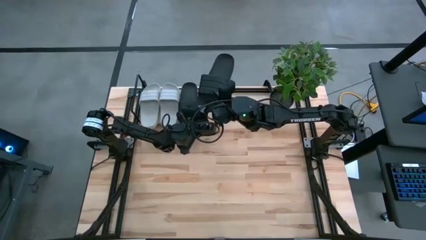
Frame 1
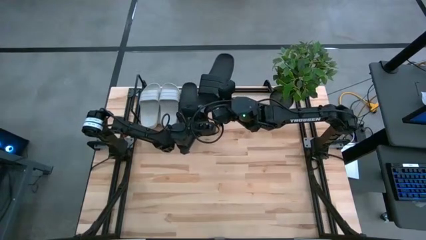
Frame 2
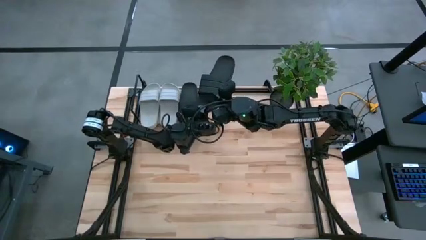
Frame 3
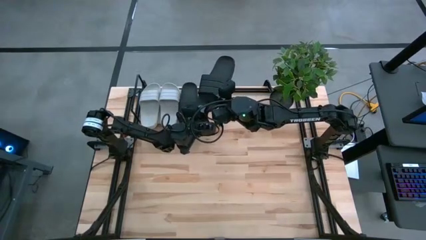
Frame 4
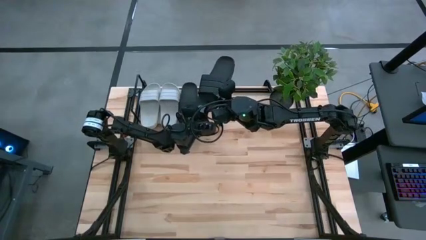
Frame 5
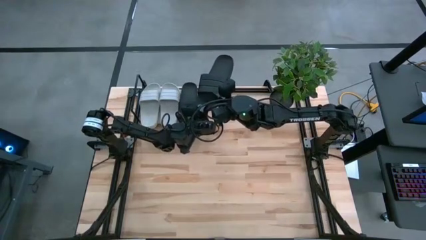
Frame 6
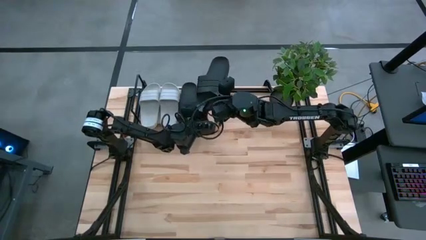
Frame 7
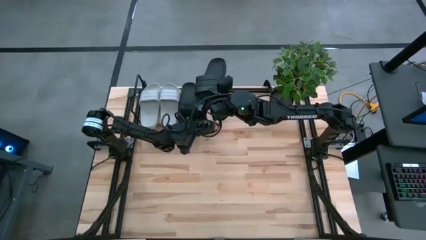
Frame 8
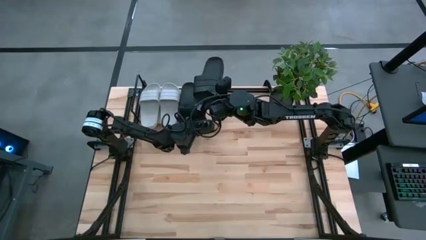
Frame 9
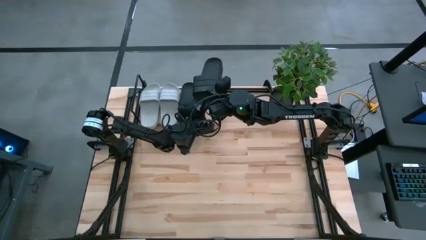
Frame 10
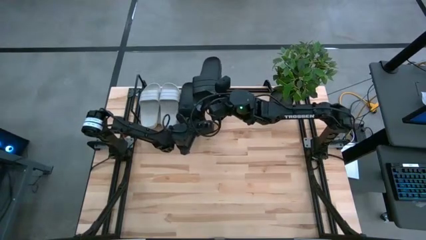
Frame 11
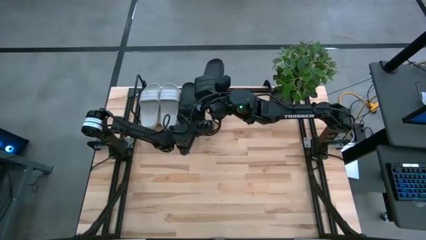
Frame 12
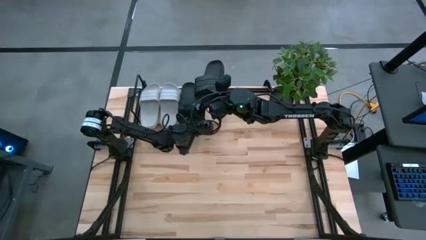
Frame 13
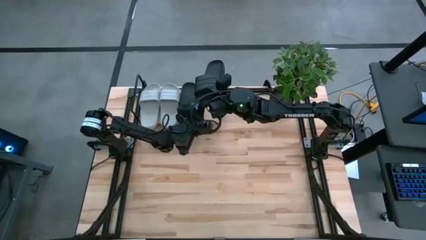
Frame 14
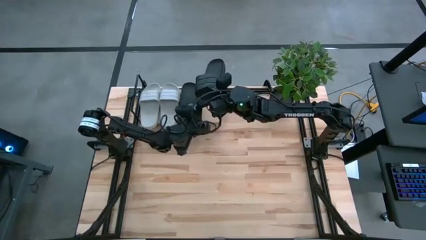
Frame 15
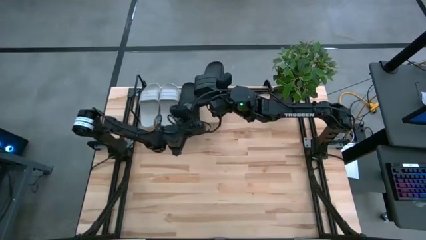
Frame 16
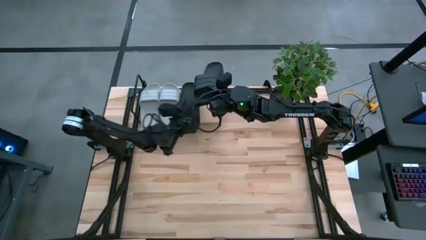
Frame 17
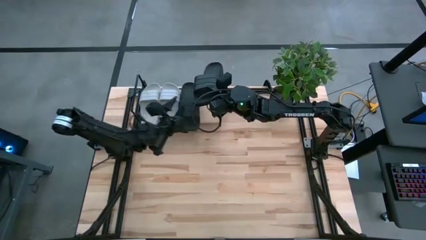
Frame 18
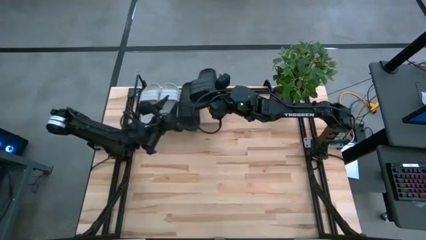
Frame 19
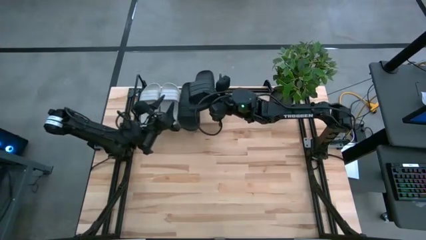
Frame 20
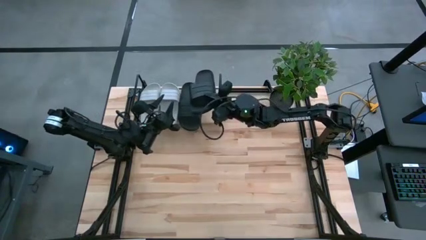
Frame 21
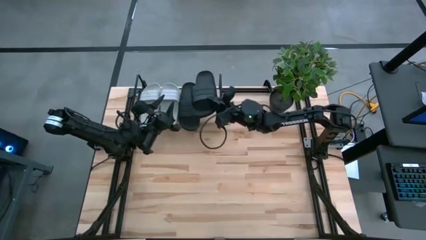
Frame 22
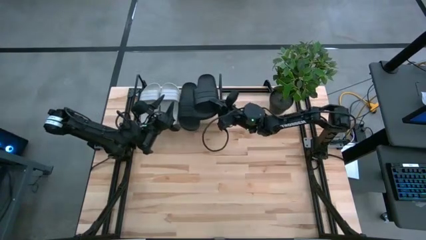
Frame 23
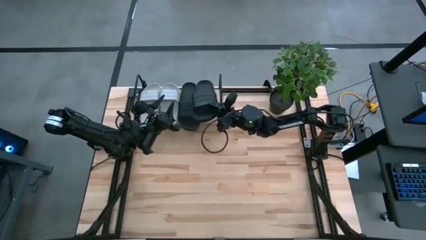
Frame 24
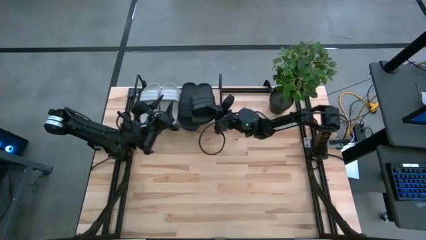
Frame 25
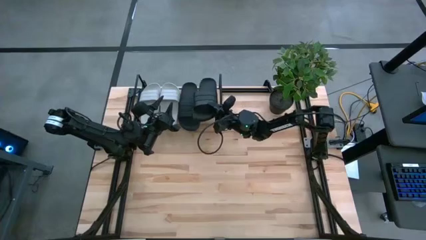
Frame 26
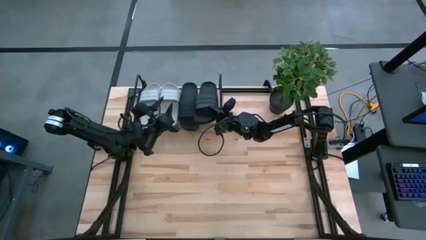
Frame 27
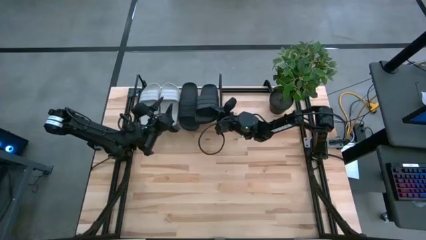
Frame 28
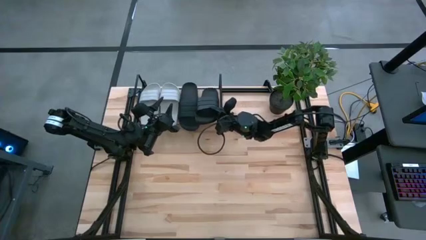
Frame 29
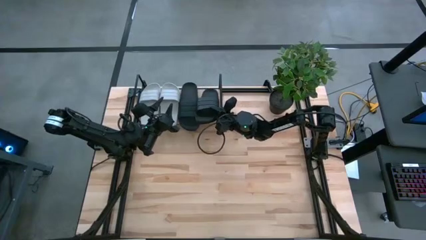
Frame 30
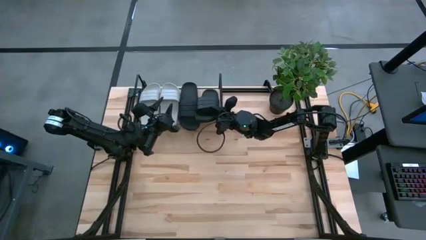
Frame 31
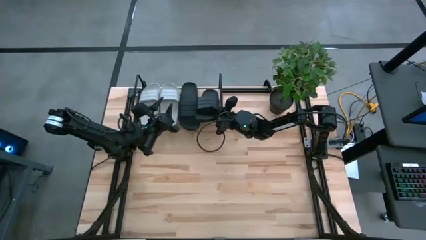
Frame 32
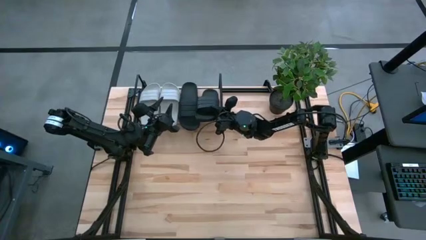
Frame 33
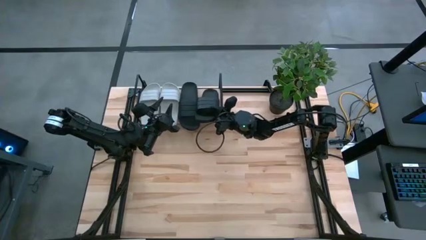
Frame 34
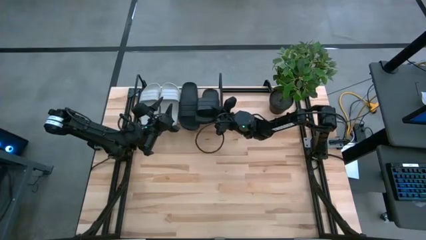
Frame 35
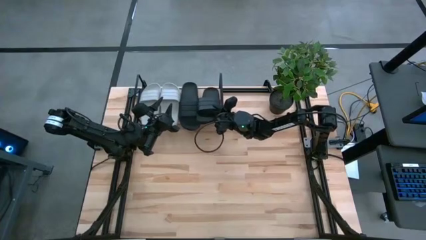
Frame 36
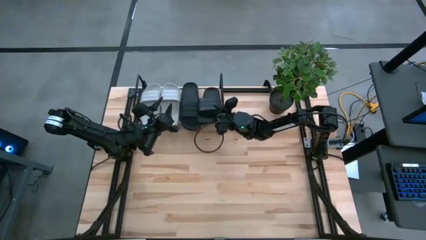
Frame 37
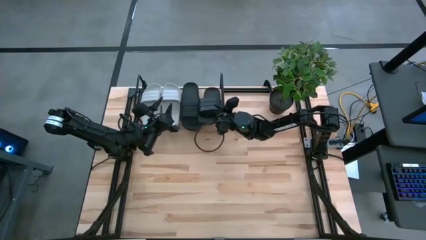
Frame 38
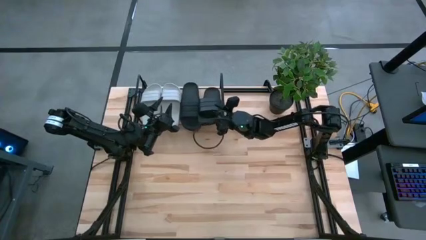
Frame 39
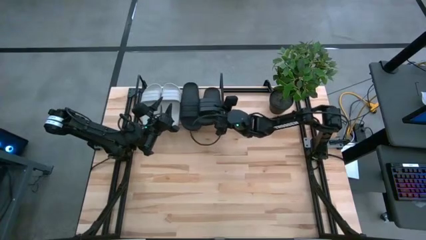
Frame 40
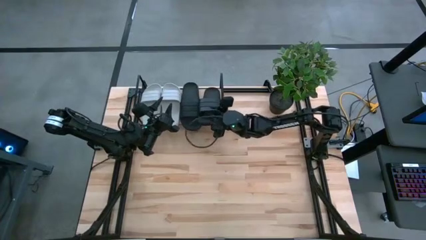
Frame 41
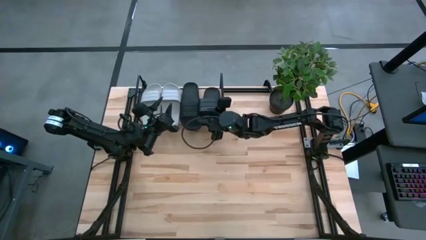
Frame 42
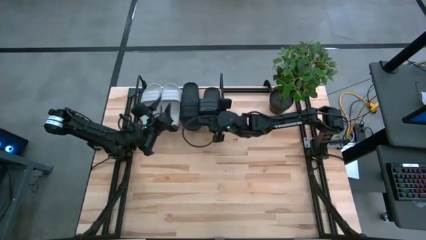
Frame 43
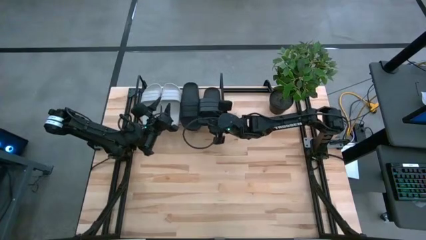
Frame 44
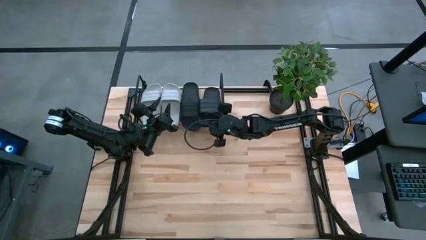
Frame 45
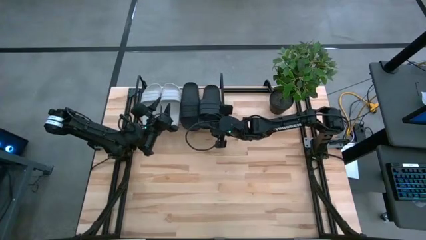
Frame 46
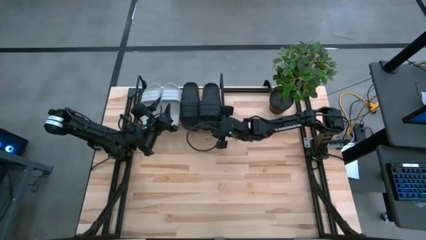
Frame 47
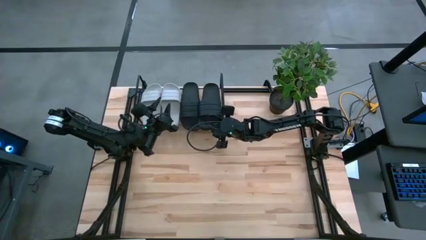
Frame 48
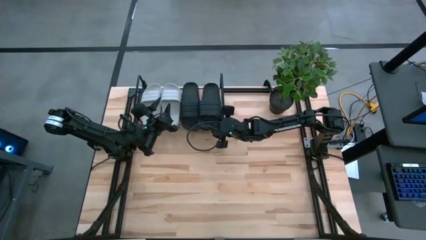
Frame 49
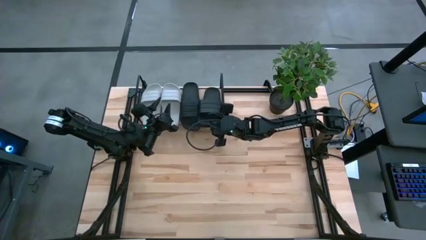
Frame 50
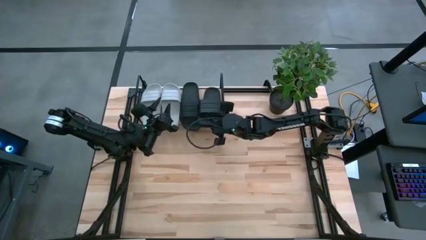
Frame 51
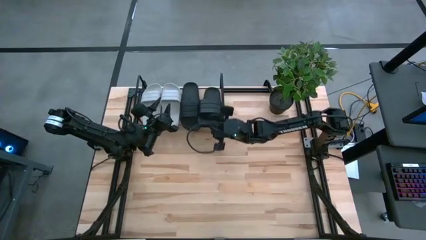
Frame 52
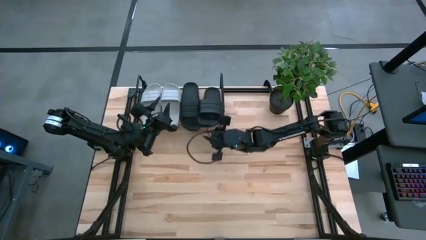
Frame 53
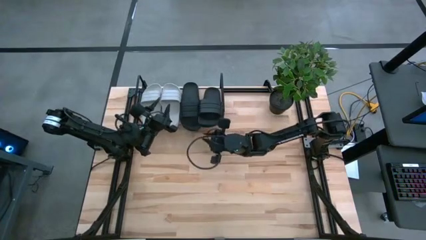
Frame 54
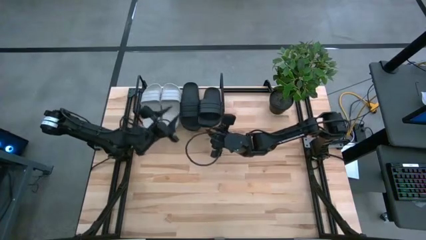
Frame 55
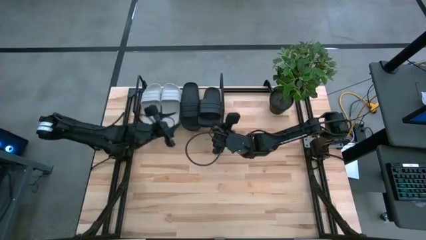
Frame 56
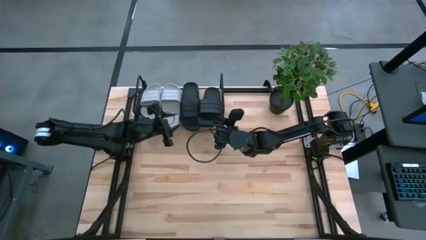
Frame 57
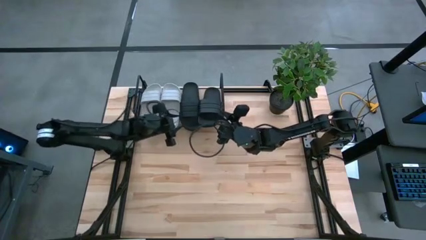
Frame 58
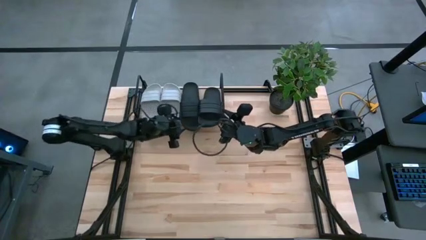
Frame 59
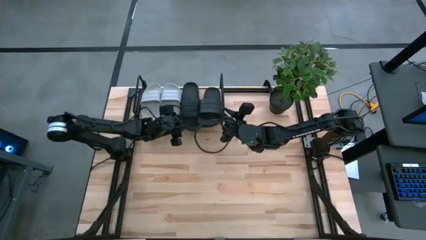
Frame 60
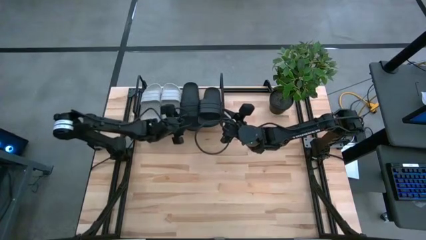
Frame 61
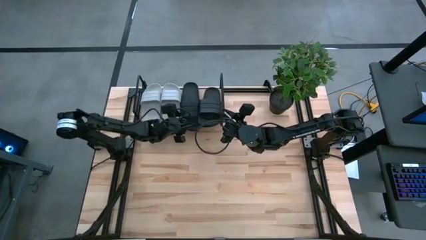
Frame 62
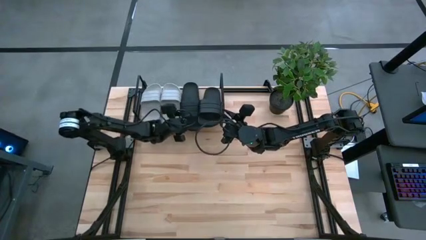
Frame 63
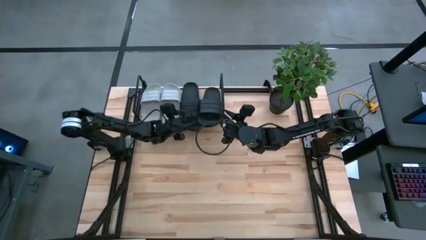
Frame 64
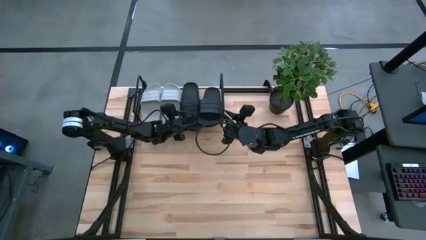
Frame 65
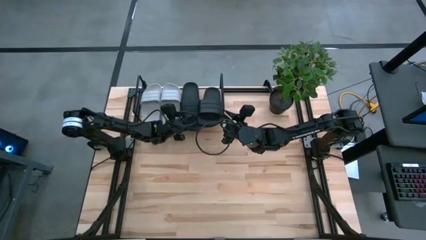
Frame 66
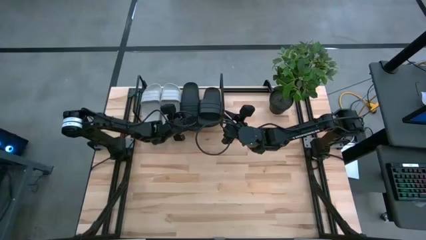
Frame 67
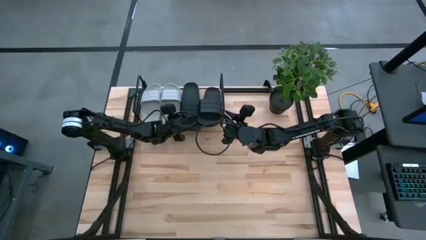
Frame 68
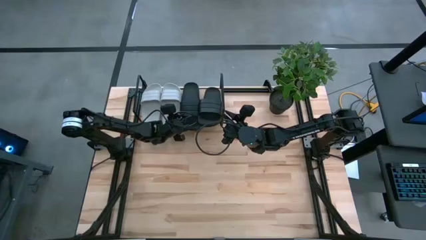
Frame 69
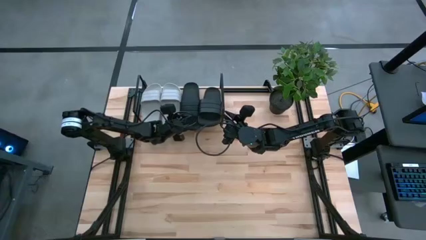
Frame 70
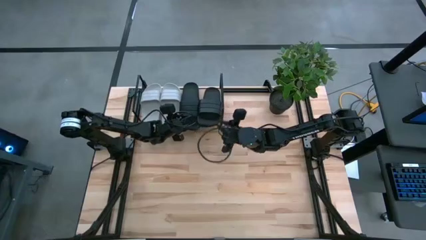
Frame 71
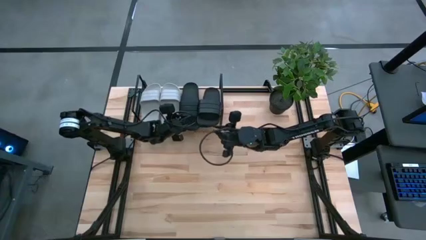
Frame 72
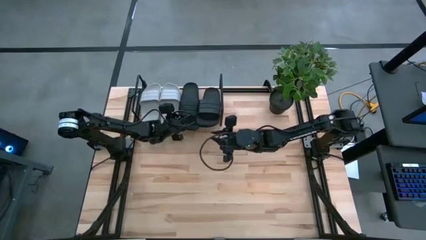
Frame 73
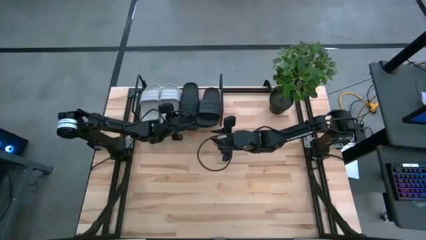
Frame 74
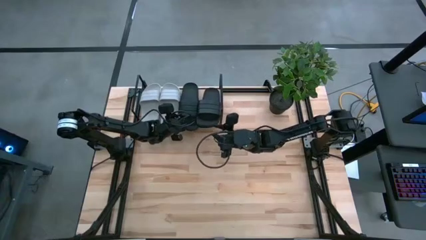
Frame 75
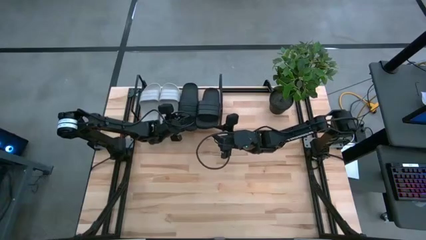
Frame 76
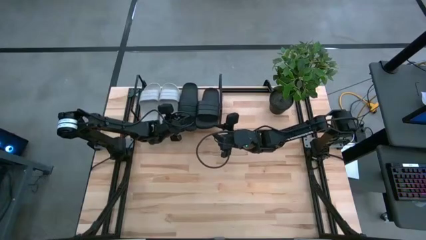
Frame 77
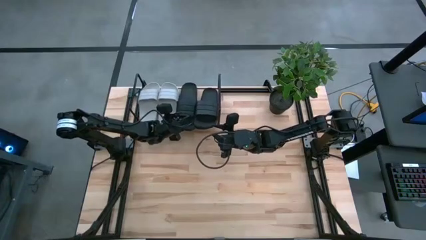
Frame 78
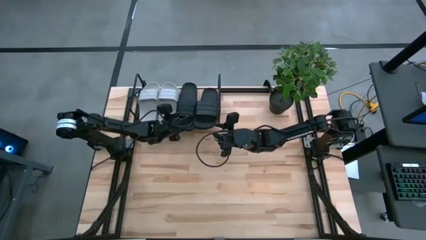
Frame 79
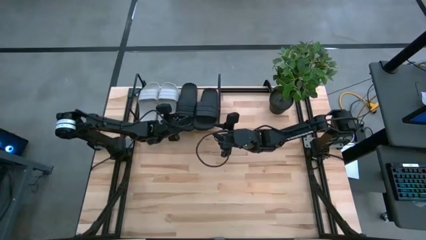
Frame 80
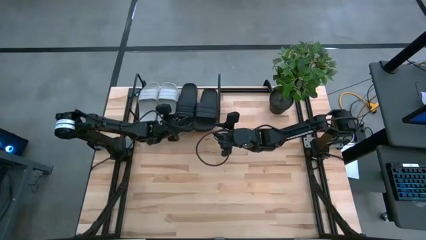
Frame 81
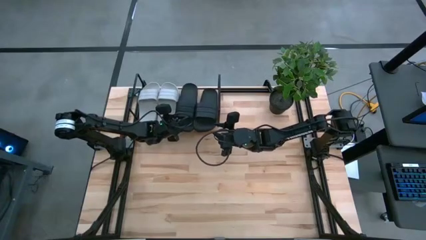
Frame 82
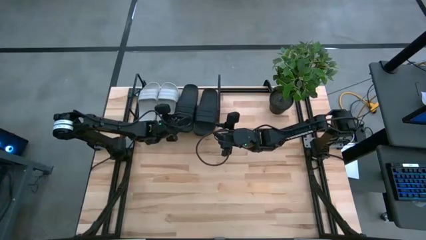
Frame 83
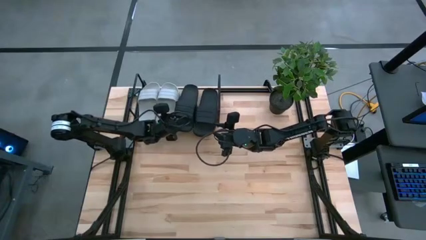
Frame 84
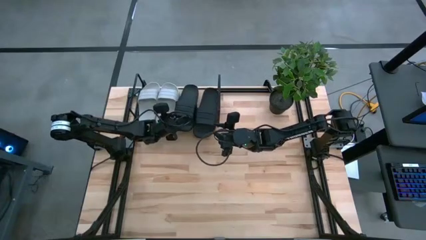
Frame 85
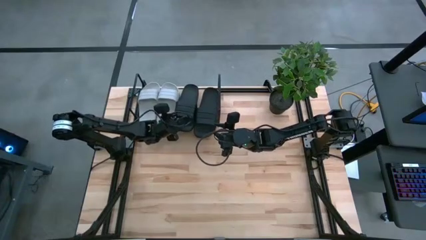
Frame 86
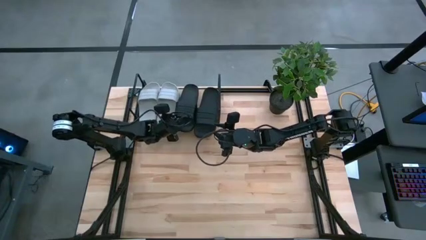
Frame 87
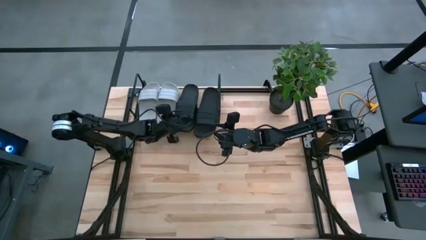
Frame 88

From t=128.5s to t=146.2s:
Task: Pick and place slides into the shelf
Put the black slides on the shelf
